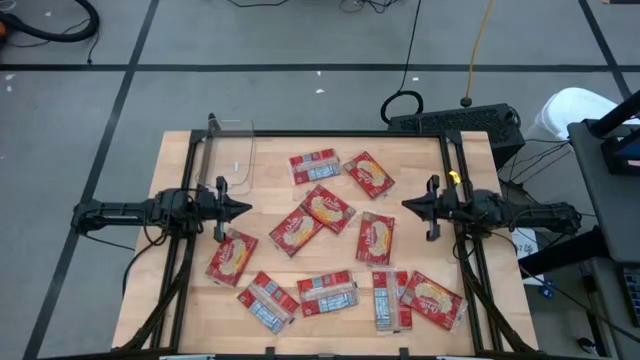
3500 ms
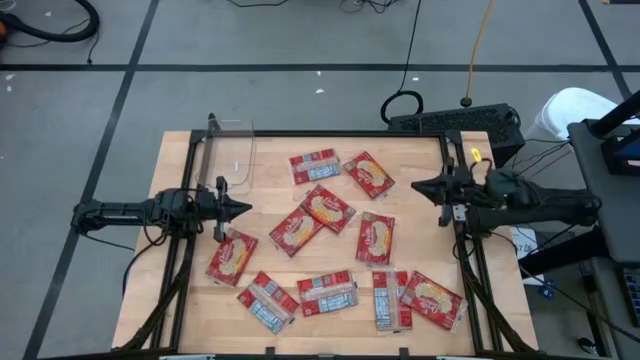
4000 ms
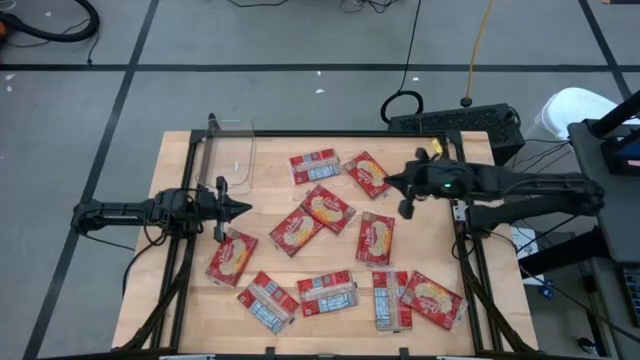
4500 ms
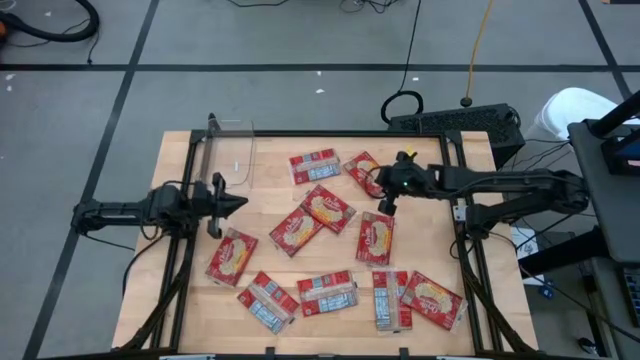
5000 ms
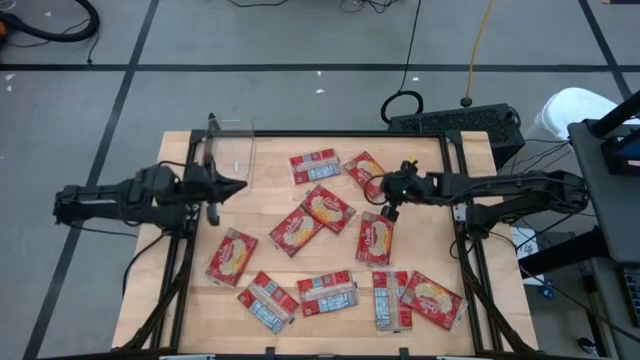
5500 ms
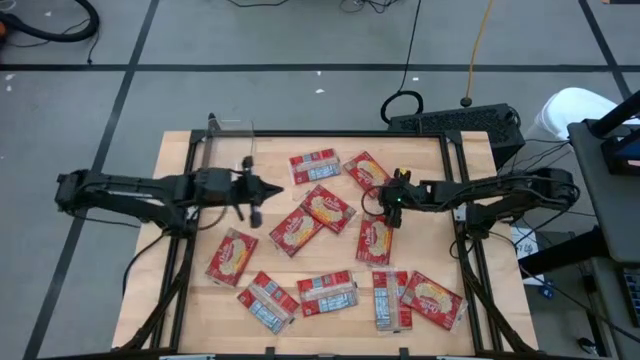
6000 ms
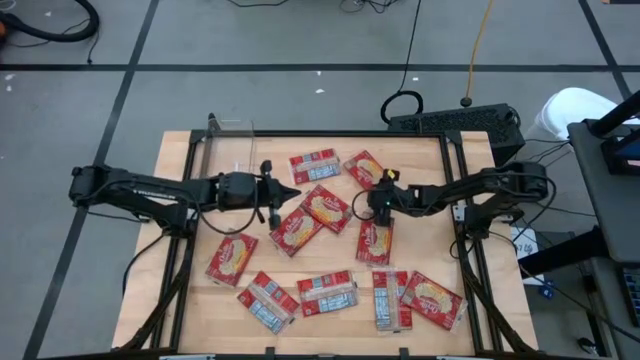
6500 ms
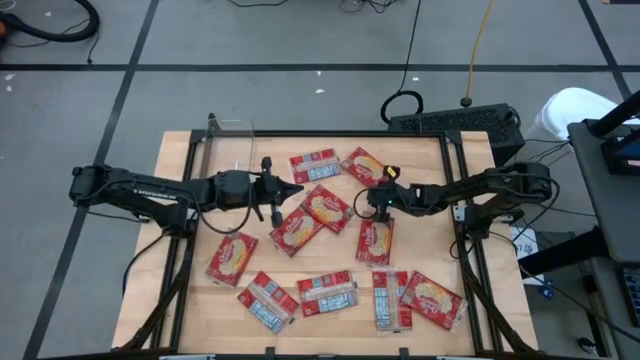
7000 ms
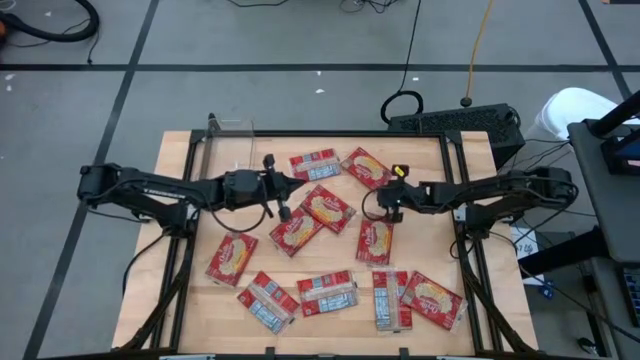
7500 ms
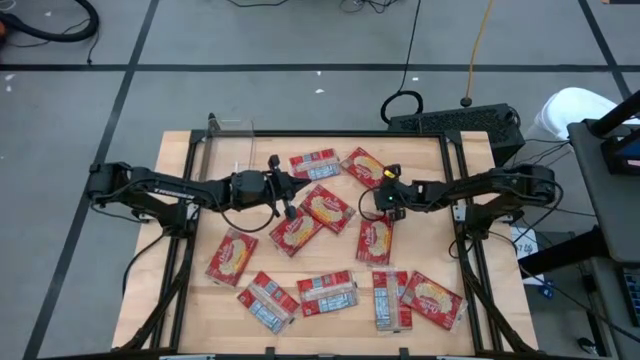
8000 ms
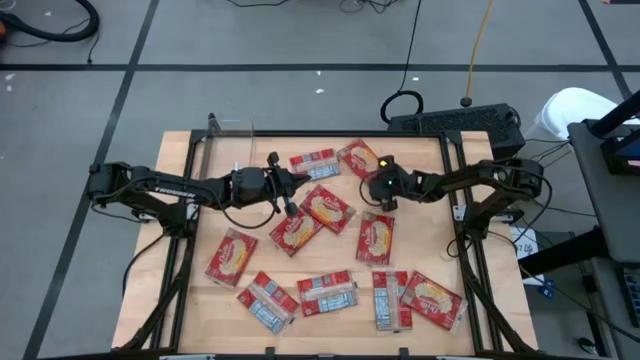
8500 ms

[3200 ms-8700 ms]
Task: Sort popcorn bags into baskets
Put the red popcorn bag into the transparent bin

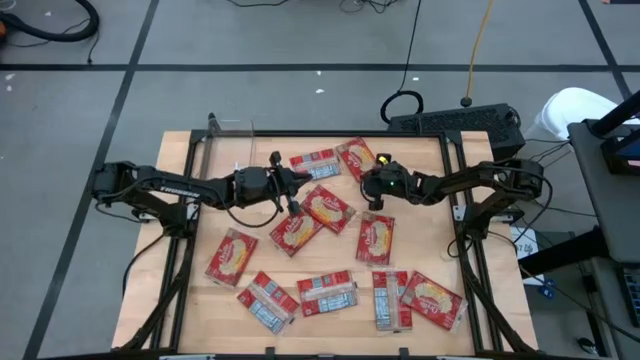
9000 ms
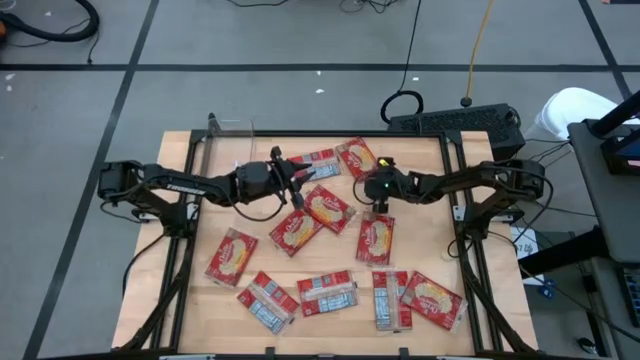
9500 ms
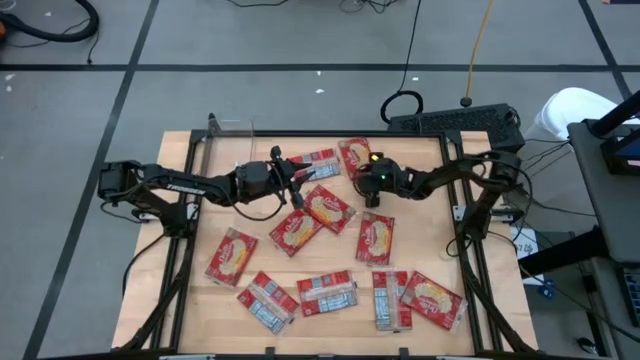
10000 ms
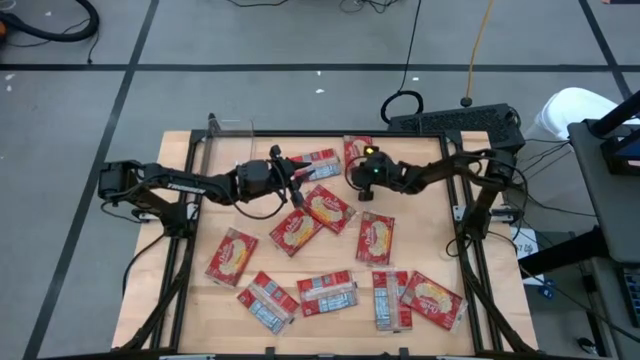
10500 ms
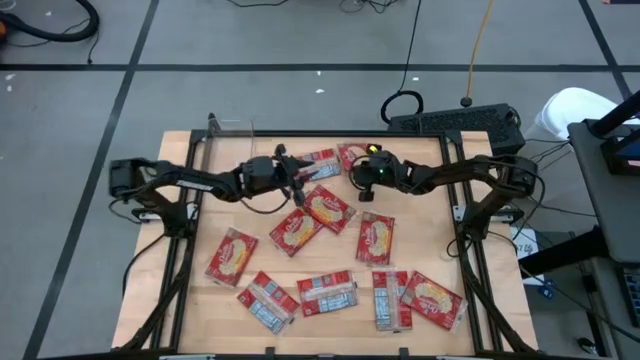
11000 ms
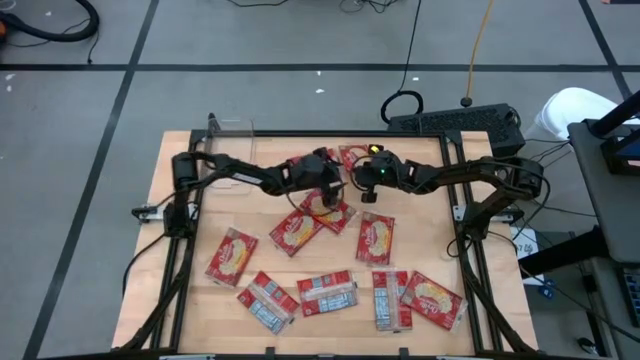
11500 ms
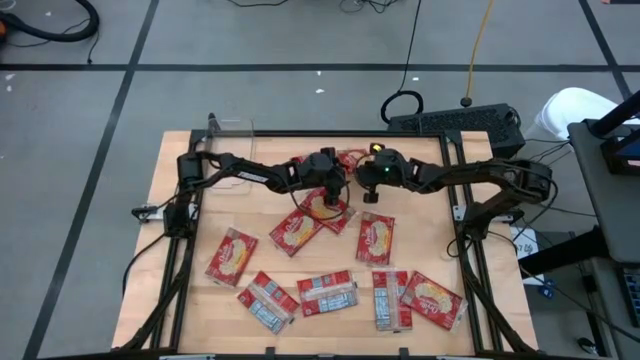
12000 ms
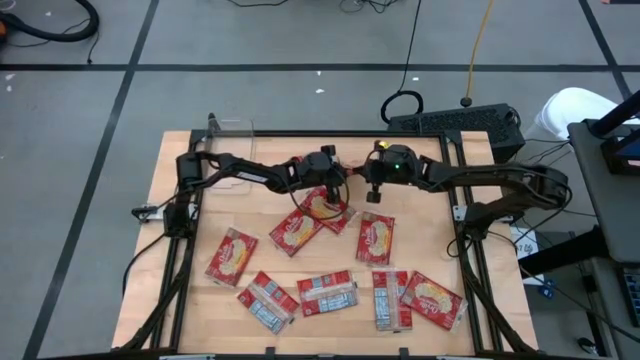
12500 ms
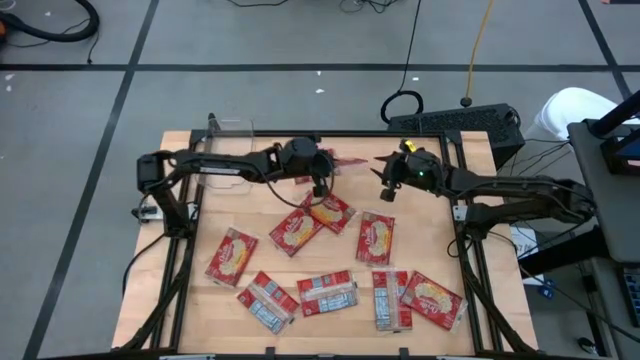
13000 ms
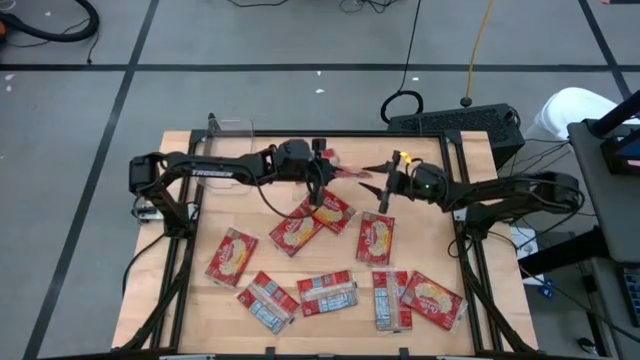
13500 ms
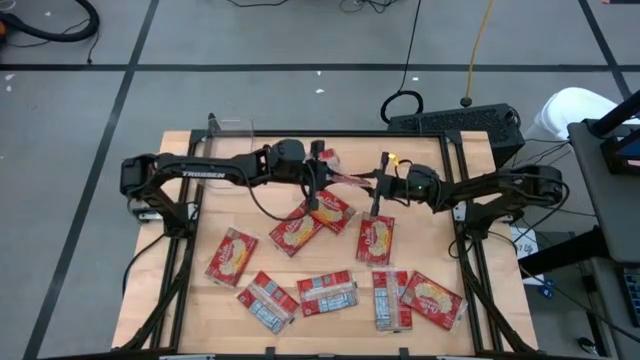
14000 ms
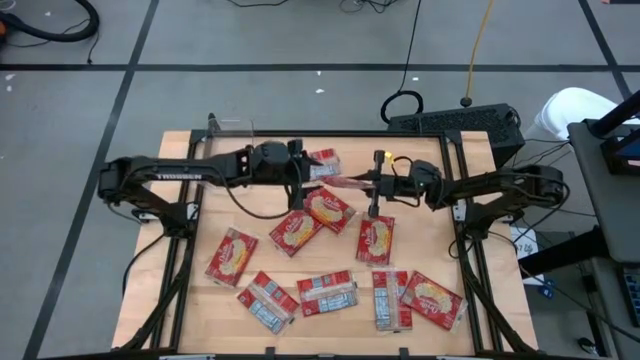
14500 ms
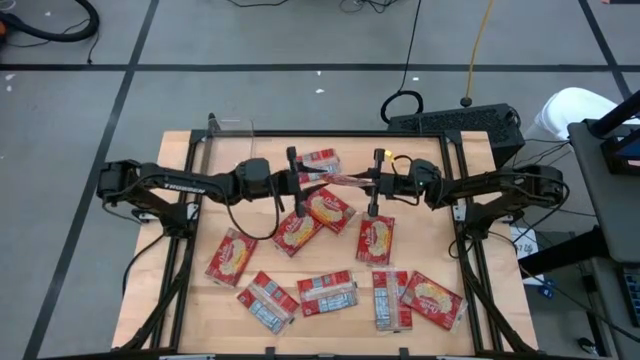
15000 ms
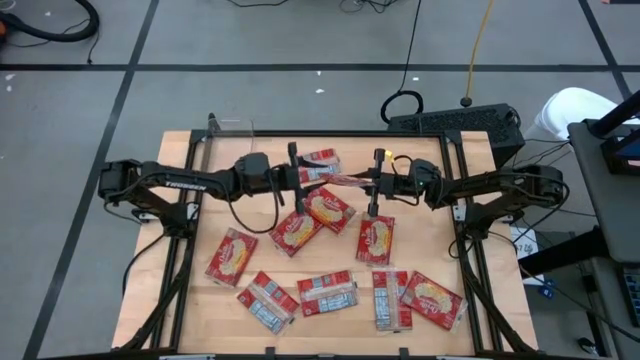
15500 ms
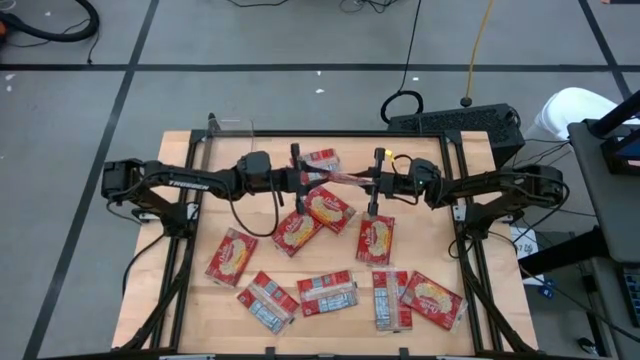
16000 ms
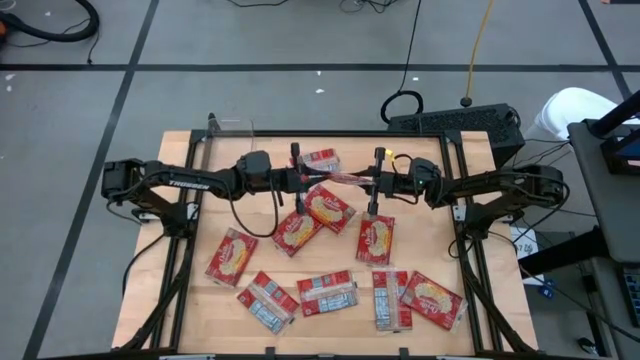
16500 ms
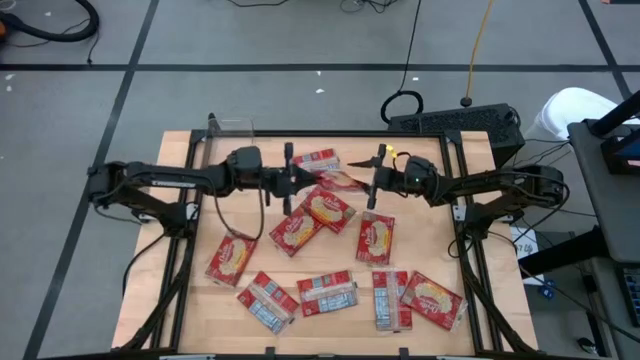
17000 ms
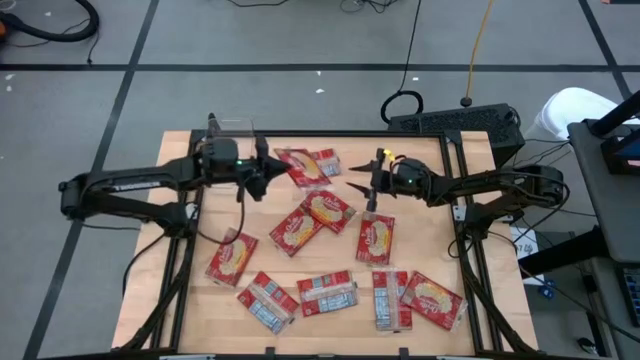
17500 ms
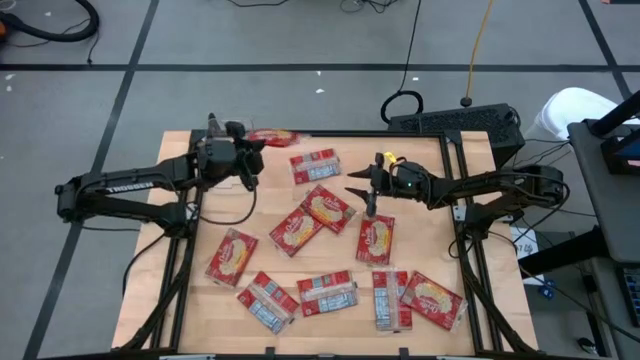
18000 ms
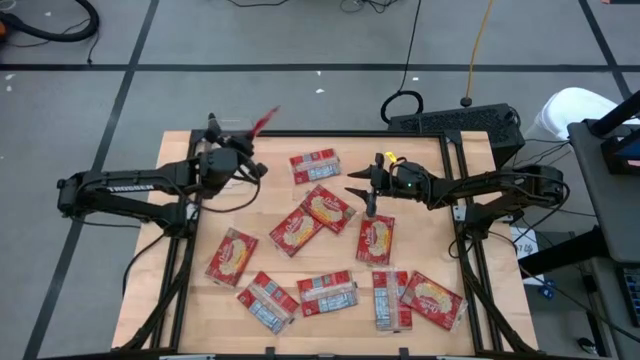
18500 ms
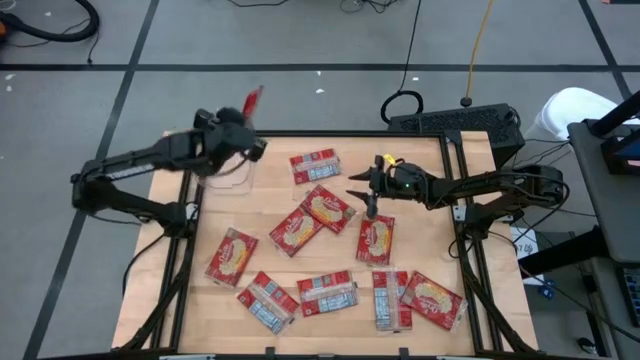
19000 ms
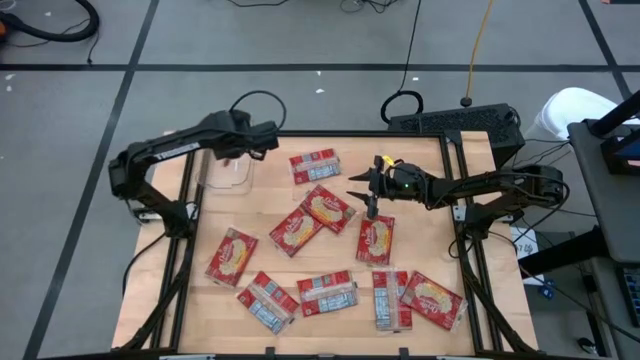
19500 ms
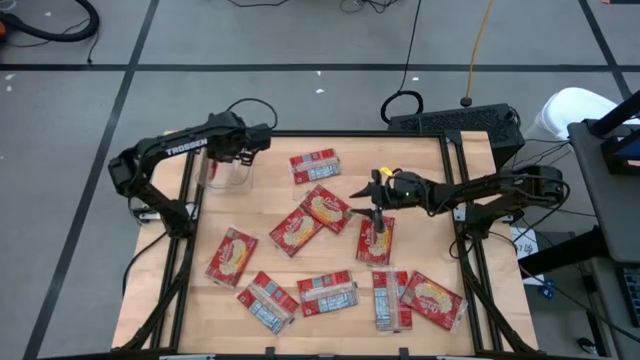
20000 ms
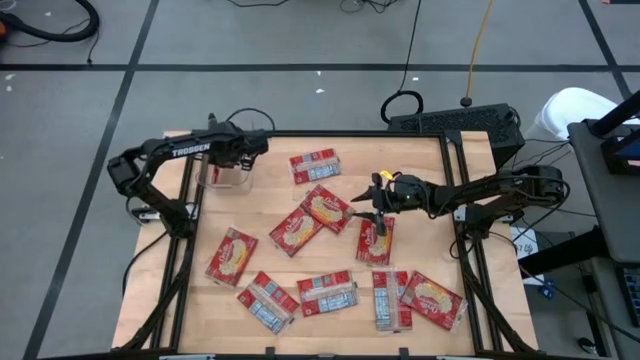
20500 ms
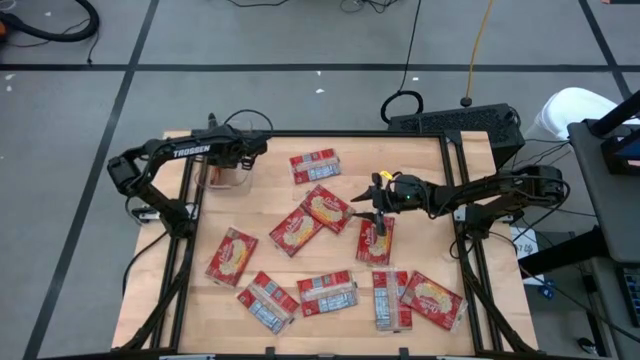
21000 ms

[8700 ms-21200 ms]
Put the red popcorn bag into the transparent bin

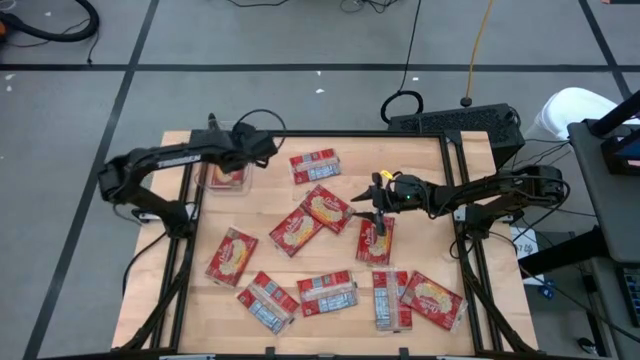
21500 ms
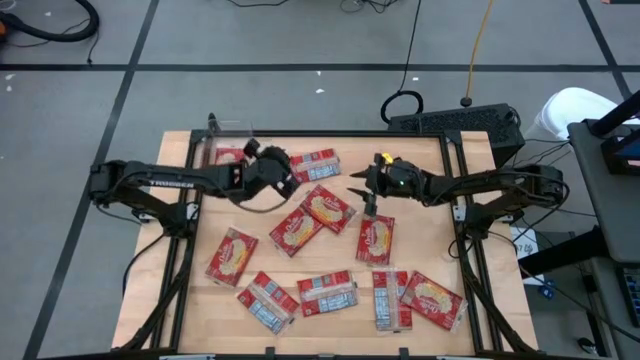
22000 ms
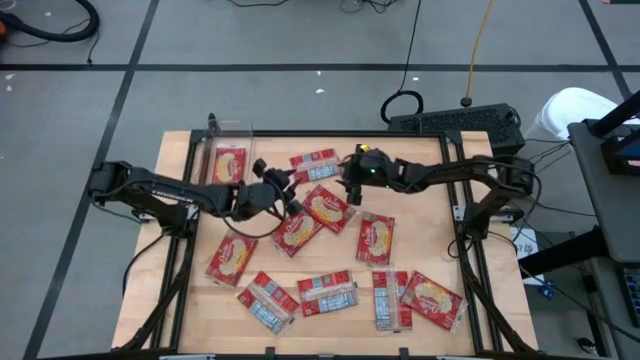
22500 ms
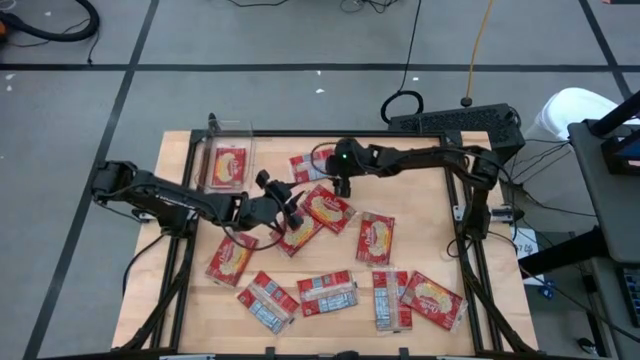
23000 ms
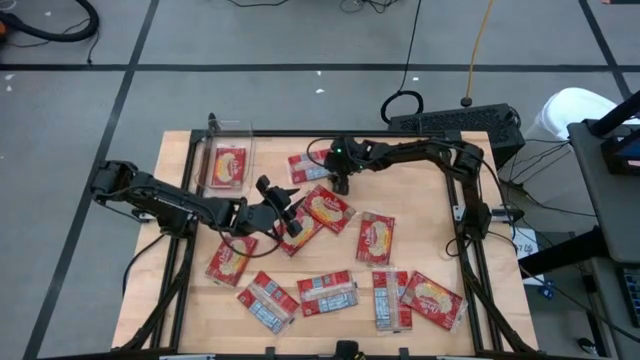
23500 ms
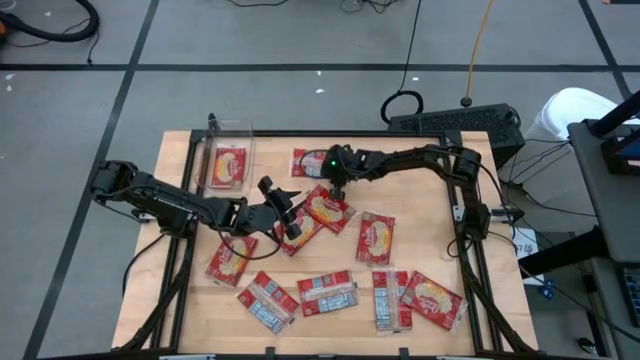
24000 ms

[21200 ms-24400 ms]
Put the red popcorn bag into the transparent bin
